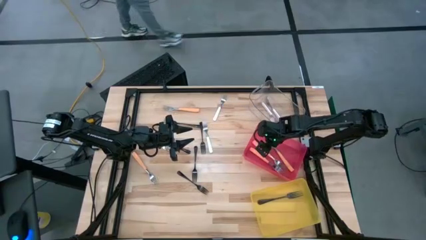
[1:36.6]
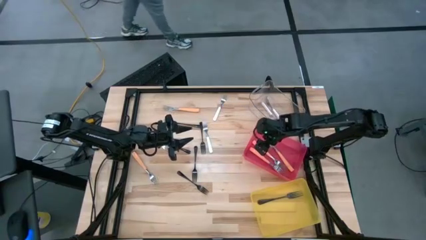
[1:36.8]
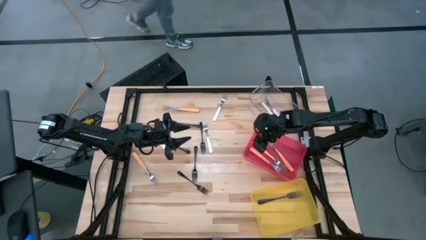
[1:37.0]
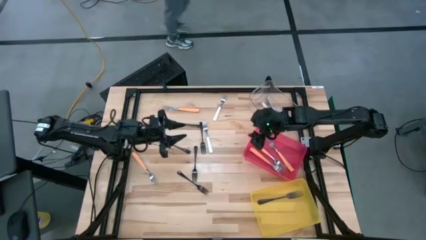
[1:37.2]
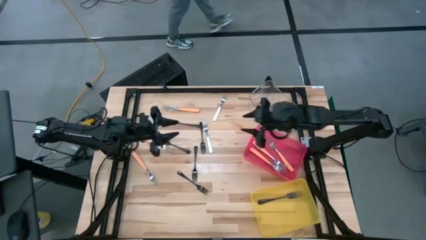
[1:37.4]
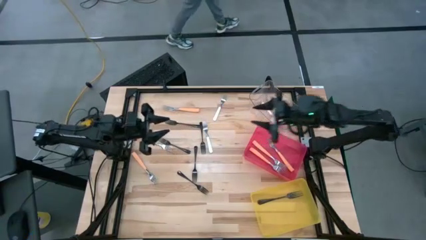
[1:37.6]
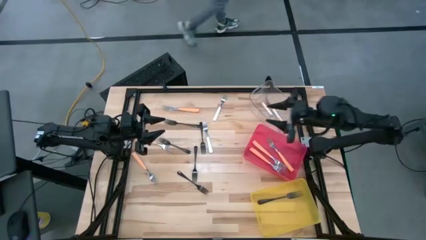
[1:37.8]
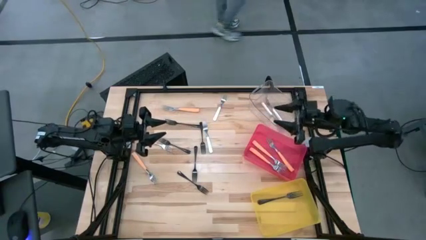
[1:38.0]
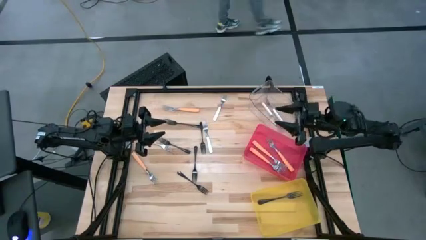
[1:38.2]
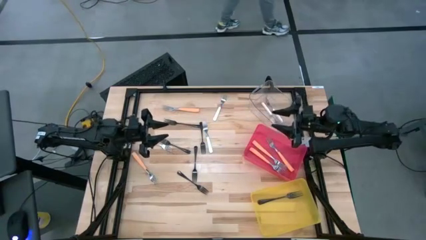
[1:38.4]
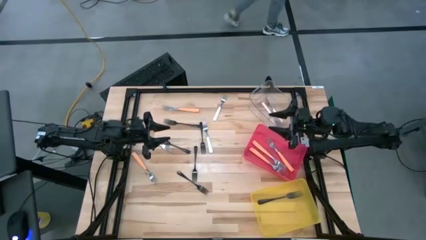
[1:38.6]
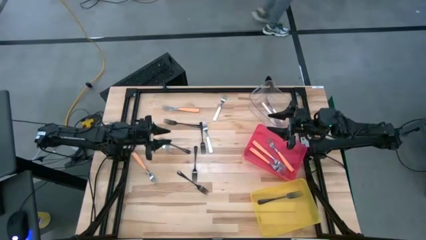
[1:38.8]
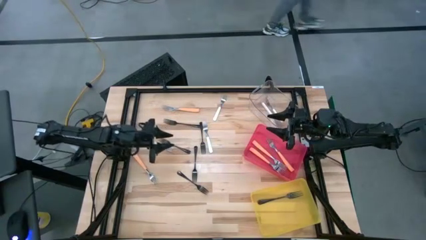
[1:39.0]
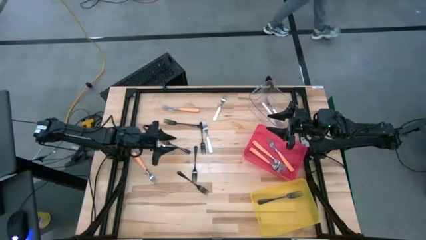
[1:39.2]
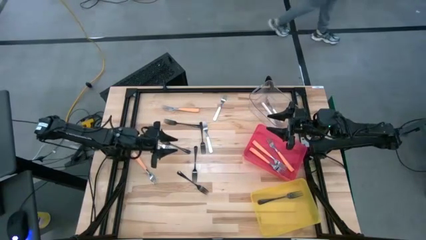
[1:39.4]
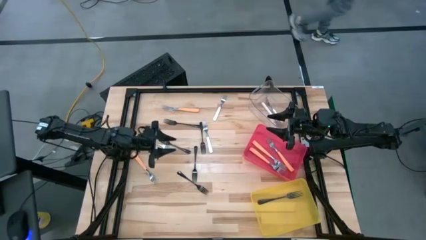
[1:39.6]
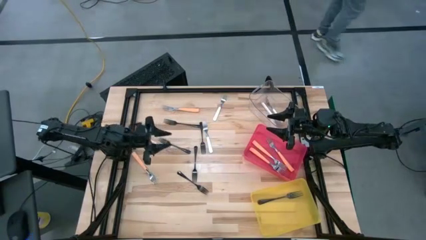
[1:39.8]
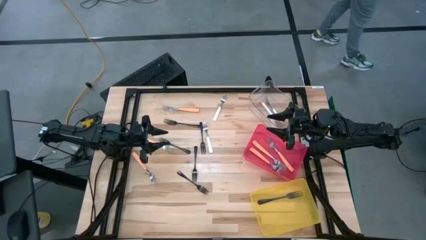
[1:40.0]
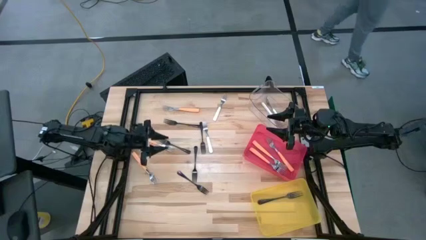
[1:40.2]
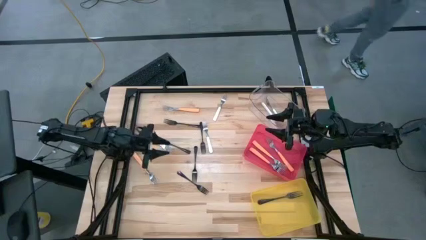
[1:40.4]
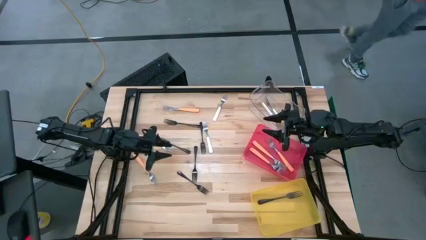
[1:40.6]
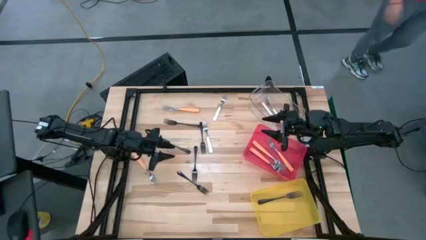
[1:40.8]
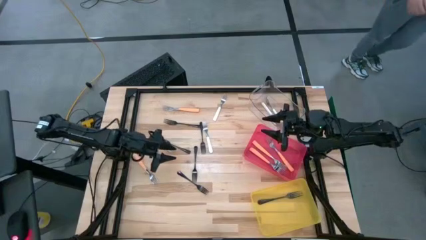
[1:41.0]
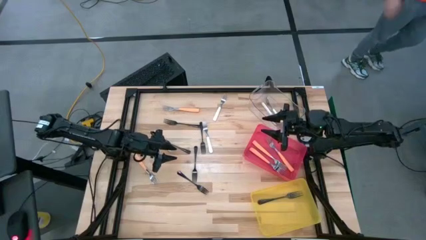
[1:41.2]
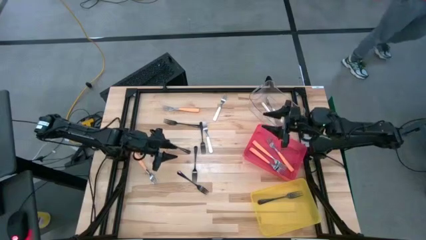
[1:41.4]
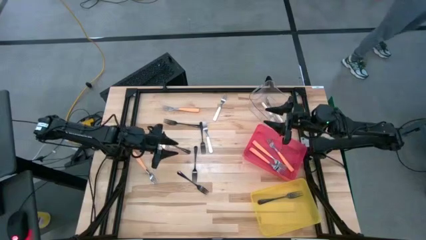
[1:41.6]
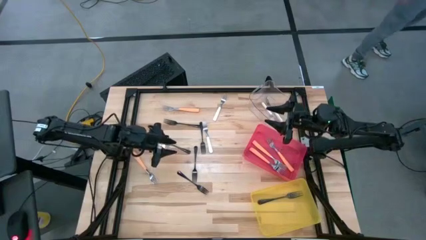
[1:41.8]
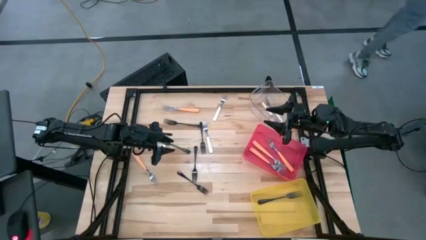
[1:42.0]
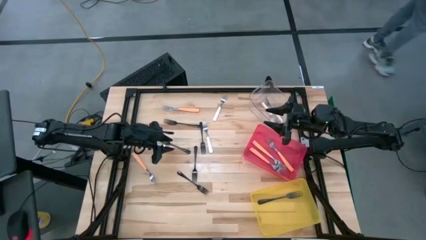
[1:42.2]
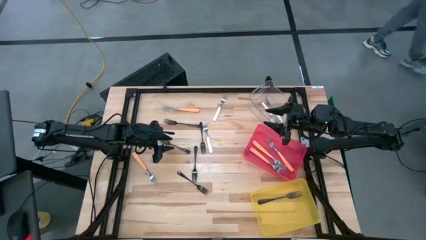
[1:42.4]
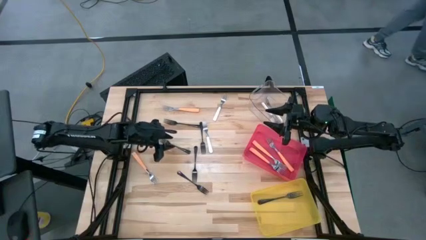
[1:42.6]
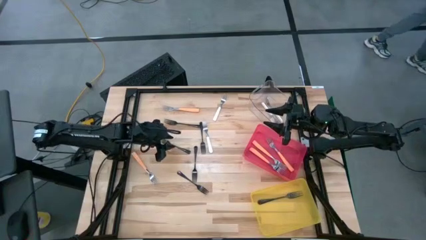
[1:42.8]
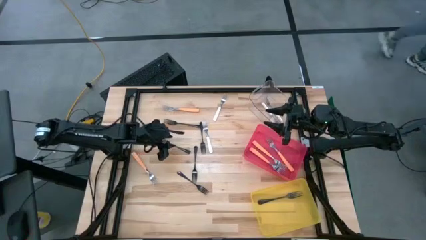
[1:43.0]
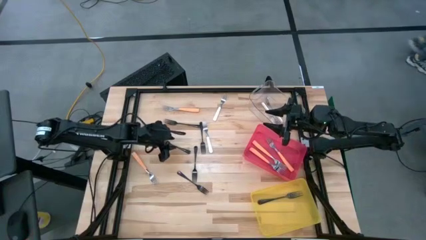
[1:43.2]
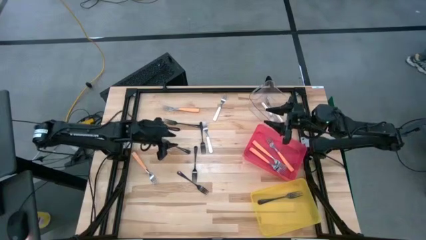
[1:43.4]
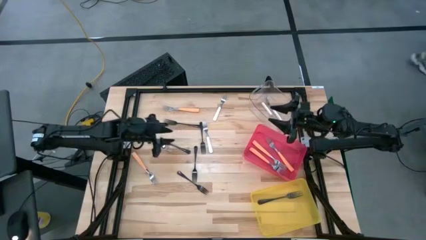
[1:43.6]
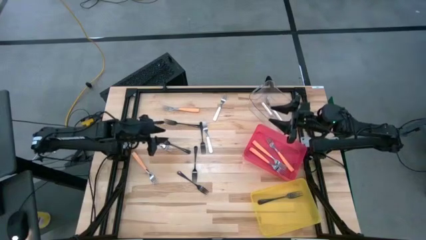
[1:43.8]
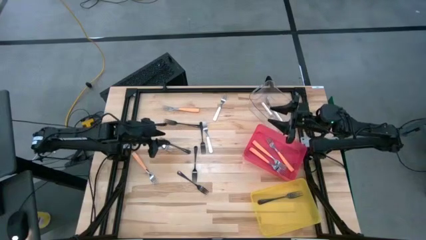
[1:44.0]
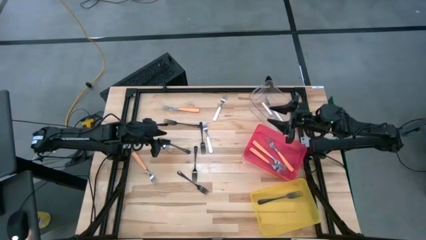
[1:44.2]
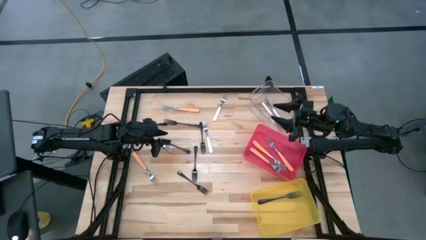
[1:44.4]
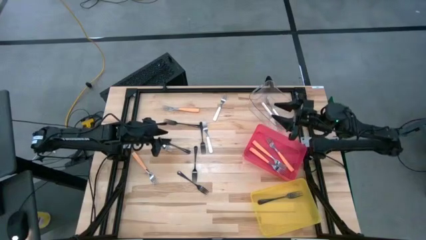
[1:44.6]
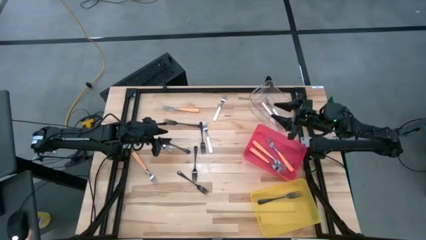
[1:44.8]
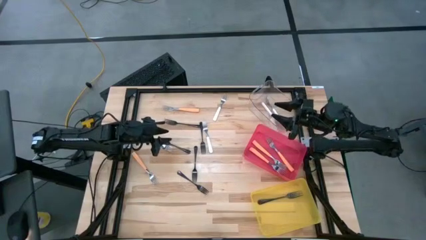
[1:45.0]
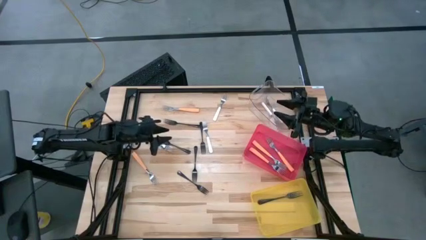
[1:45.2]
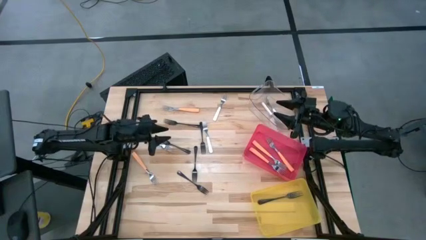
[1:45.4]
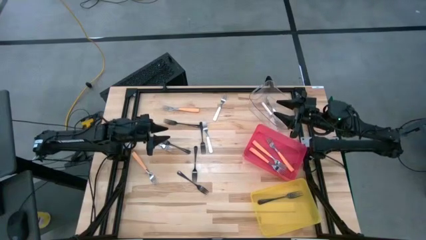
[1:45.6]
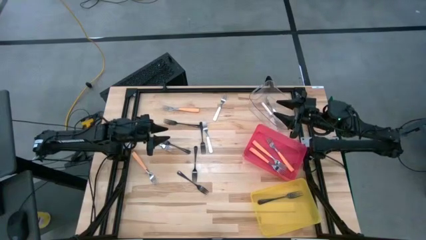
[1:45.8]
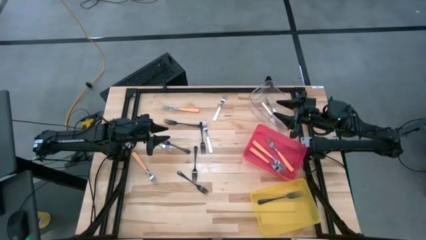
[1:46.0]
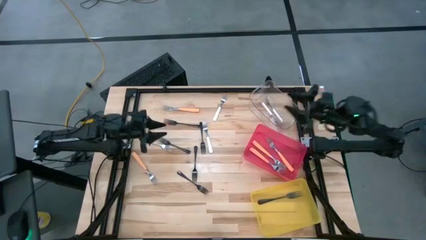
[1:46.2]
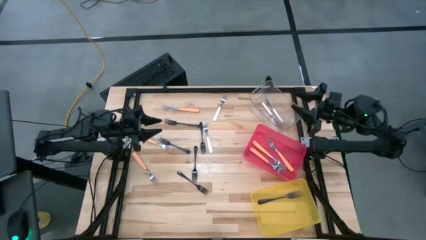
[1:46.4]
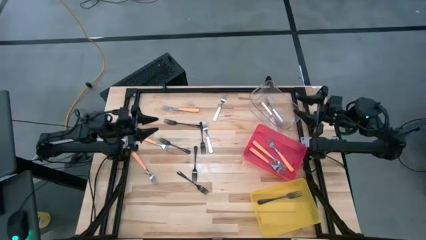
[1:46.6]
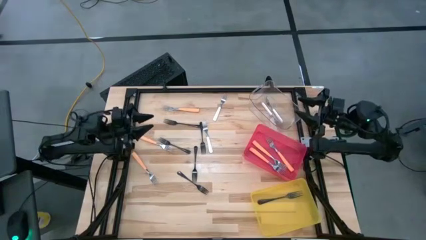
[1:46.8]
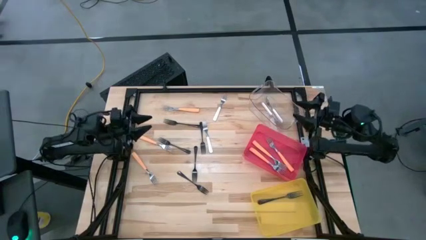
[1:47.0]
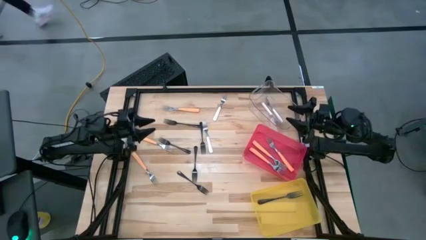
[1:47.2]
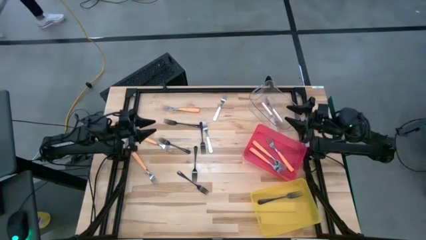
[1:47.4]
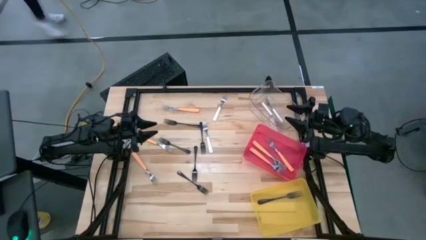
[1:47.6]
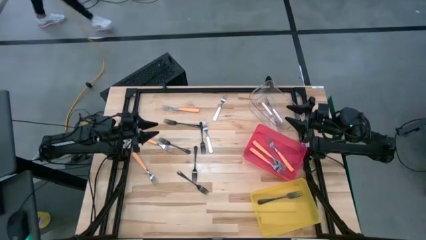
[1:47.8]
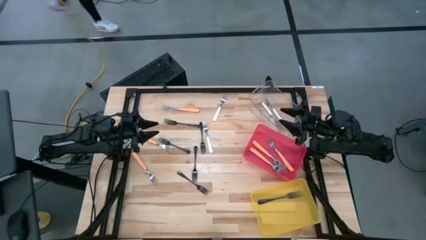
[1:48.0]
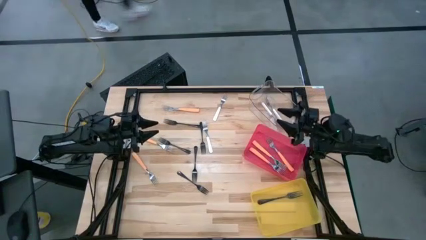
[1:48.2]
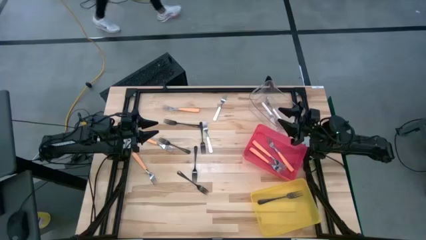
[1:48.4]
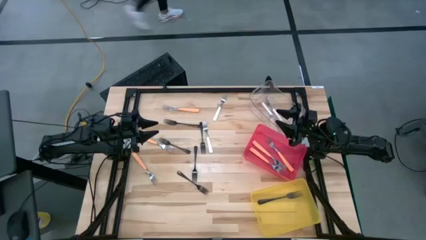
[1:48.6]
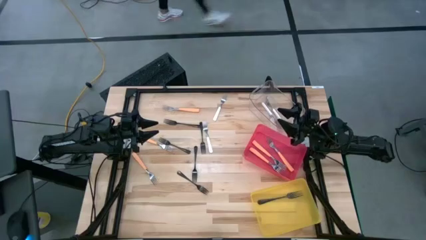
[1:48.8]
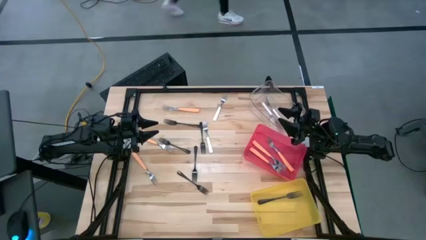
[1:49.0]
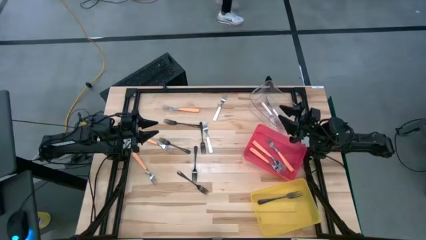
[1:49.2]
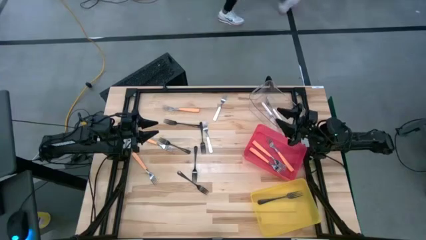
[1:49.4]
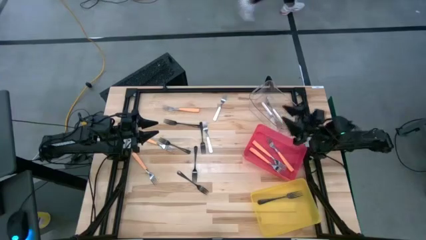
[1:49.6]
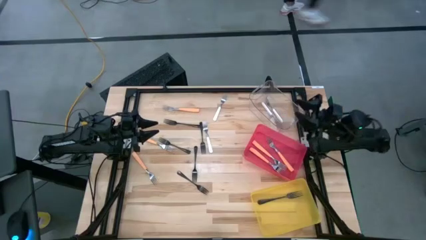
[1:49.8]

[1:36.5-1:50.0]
Task: Sort silverware by color (type)
Put the black fork into the yellow bin

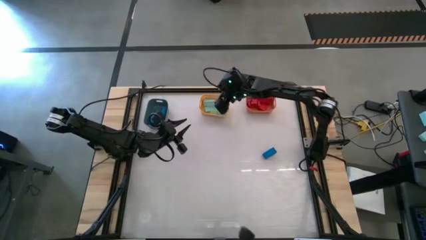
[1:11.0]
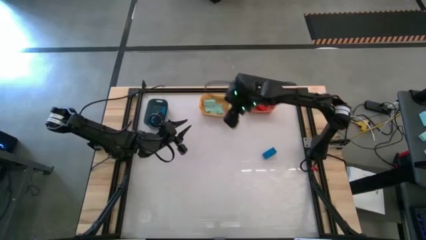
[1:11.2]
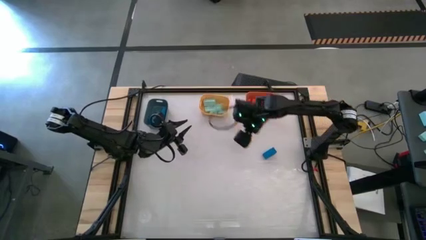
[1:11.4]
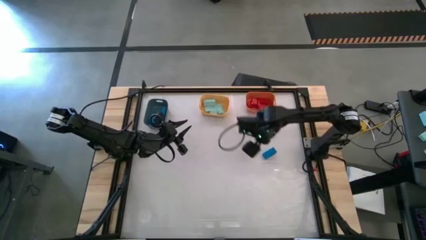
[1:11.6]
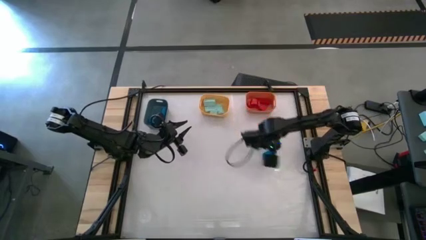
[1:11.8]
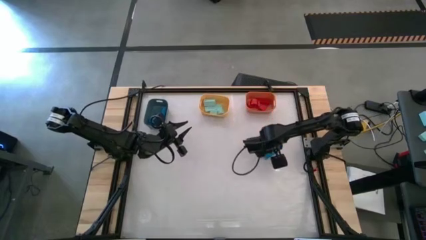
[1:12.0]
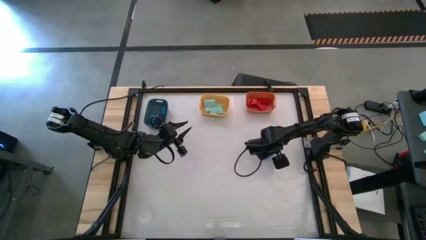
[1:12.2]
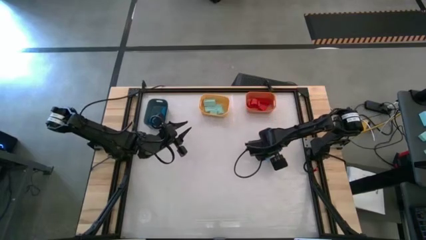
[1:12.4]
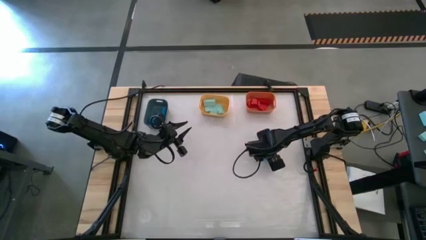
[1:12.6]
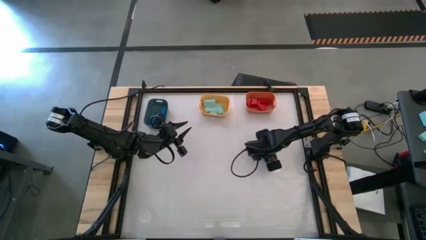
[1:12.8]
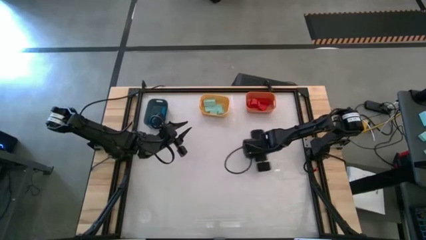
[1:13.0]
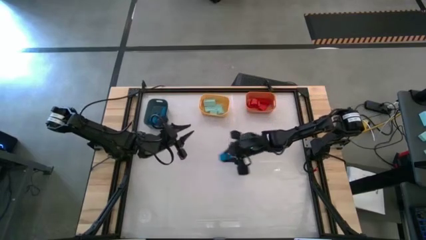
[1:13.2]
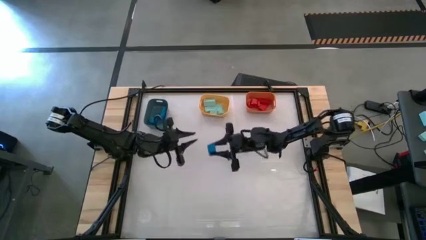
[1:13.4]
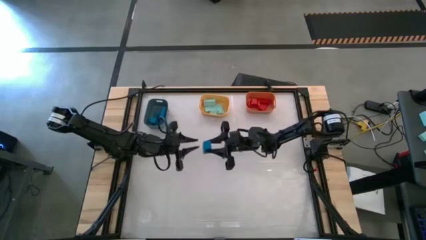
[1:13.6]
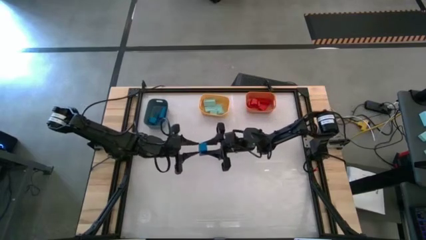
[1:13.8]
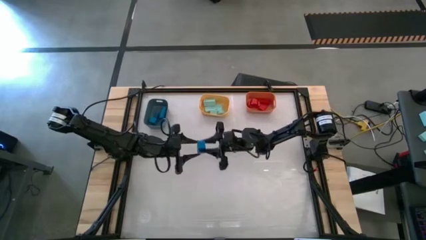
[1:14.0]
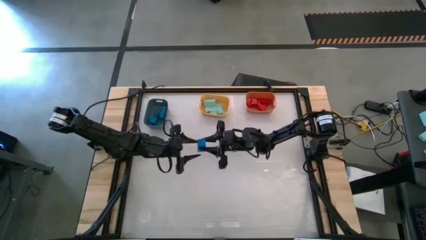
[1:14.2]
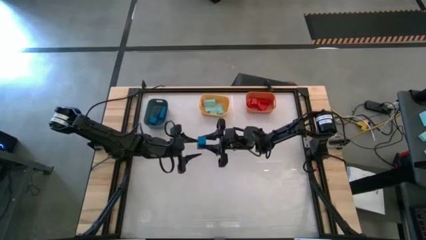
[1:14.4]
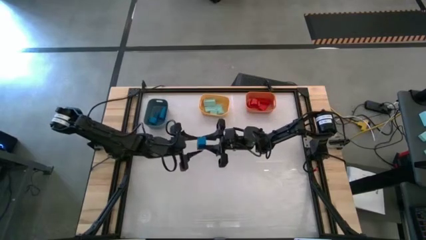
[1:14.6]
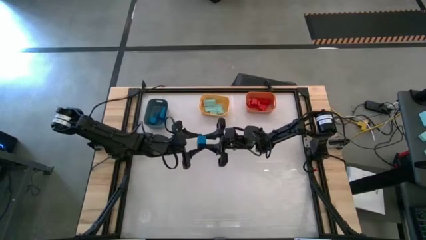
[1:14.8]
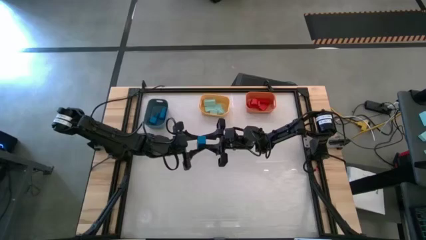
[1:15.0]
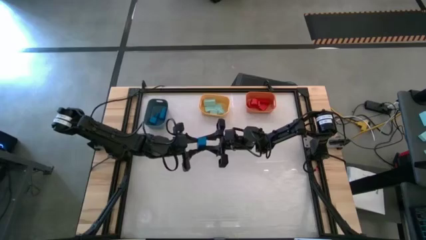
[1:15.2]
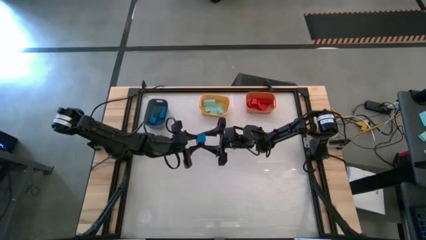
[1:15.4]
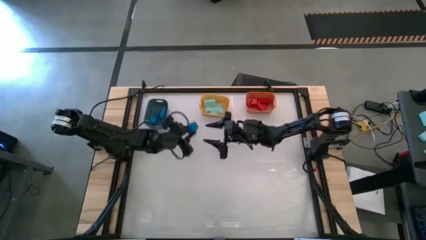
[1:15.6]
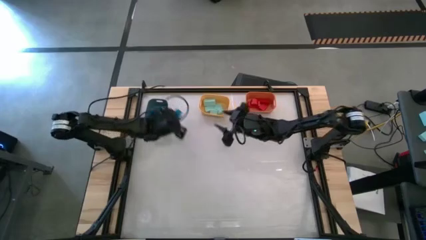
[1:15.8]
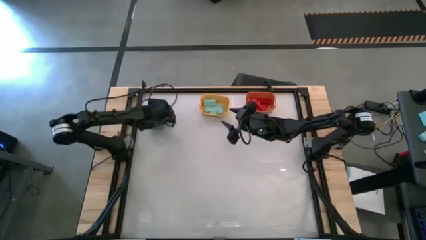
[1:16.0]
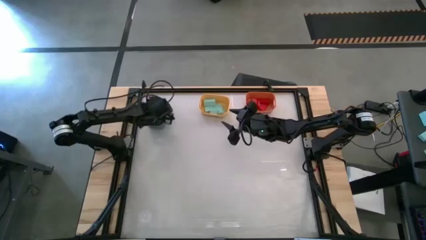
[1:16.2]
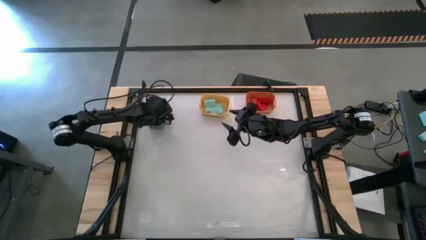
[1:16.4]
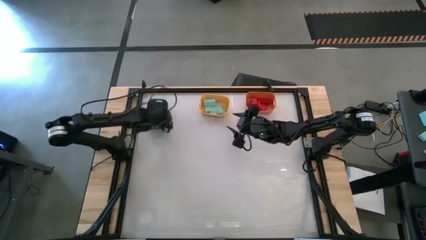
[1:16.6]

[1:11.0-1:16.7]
Task: Sort & place blocks by color
Put the blue cube block into the dark blue bin
